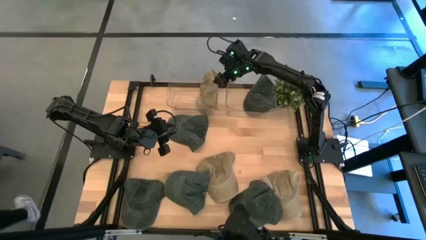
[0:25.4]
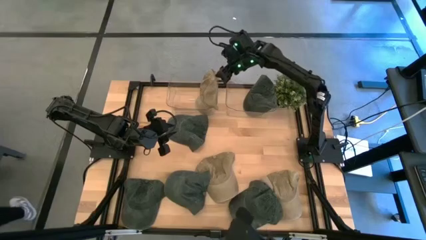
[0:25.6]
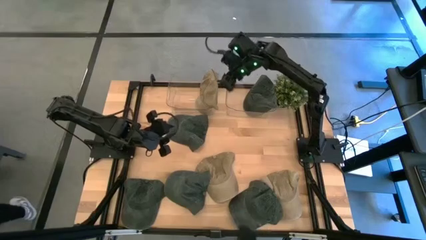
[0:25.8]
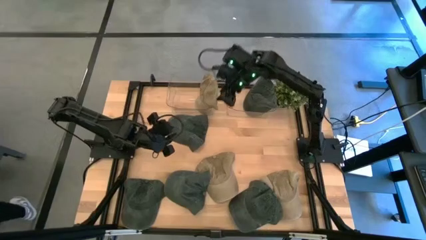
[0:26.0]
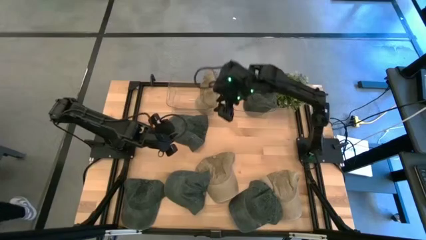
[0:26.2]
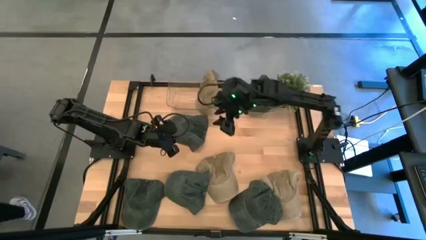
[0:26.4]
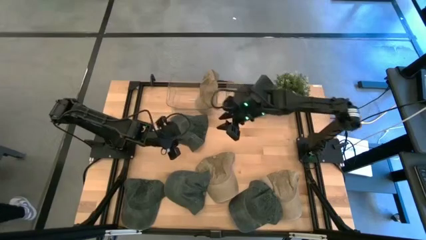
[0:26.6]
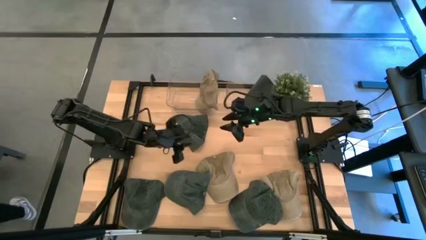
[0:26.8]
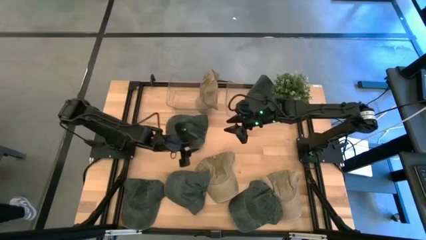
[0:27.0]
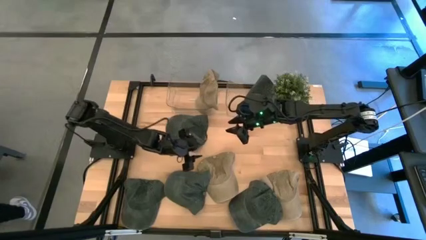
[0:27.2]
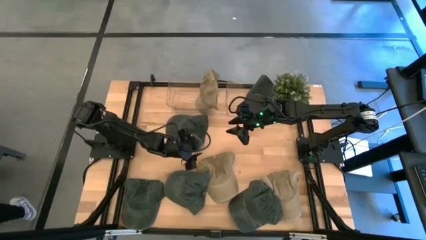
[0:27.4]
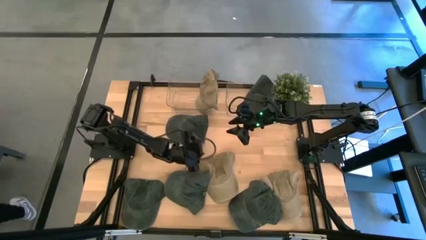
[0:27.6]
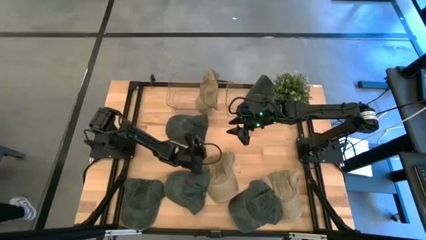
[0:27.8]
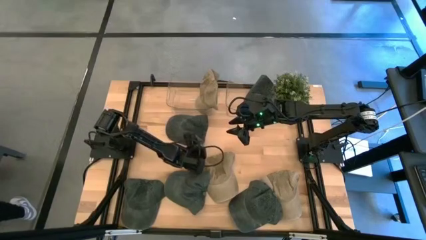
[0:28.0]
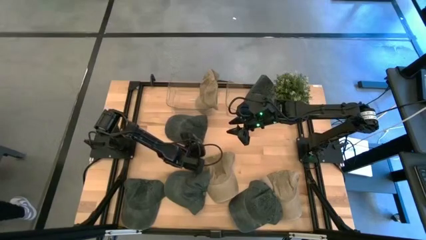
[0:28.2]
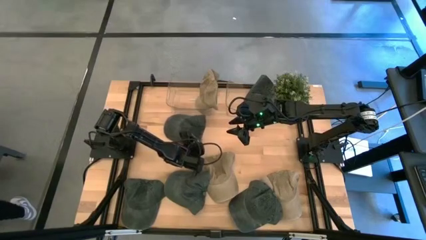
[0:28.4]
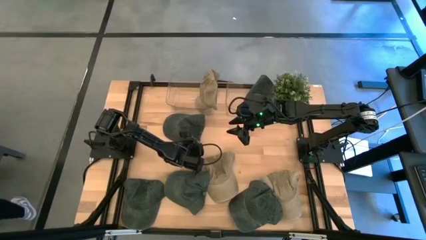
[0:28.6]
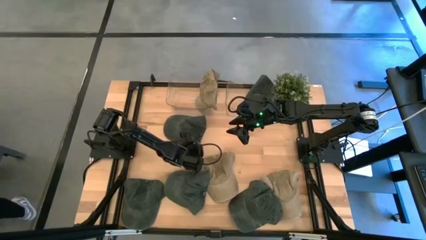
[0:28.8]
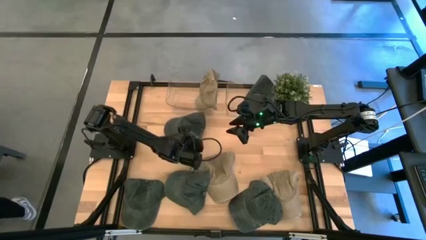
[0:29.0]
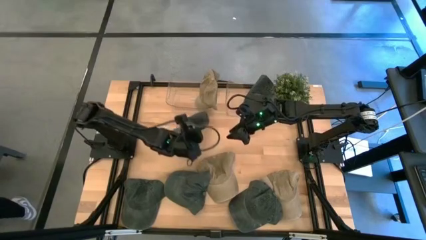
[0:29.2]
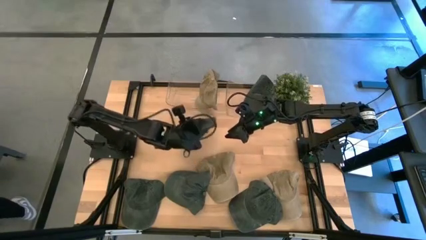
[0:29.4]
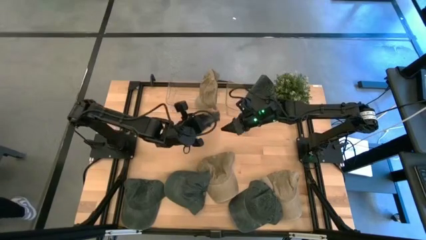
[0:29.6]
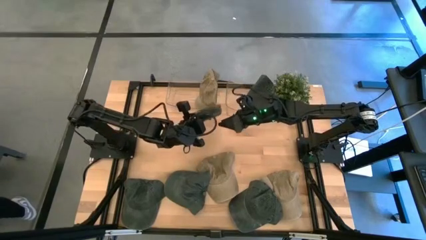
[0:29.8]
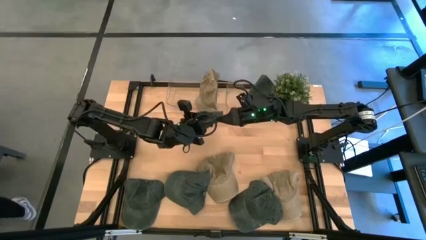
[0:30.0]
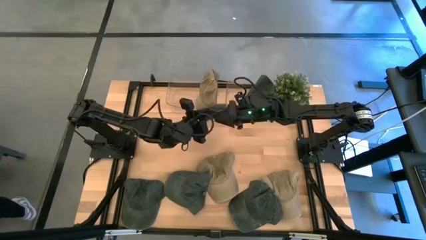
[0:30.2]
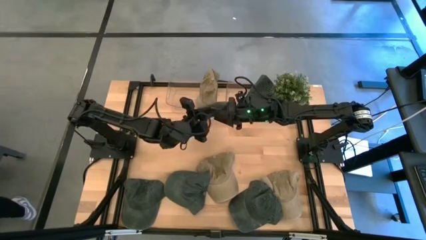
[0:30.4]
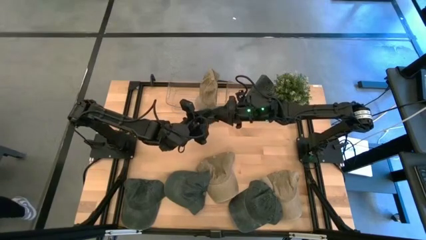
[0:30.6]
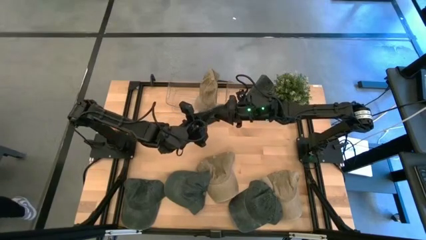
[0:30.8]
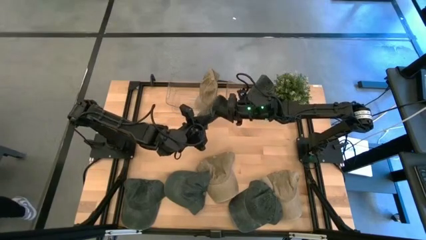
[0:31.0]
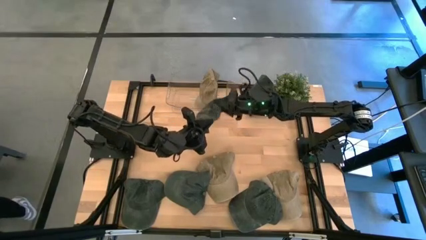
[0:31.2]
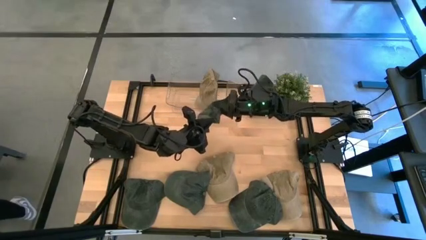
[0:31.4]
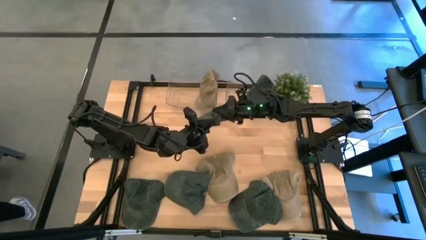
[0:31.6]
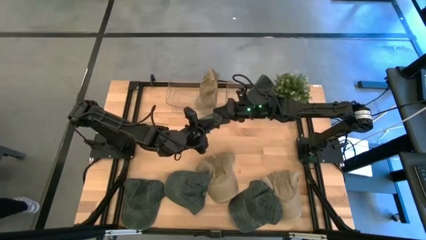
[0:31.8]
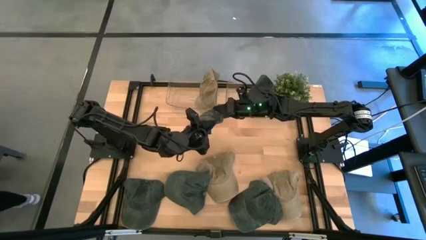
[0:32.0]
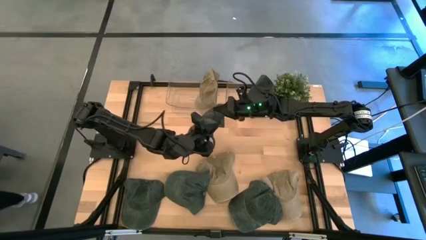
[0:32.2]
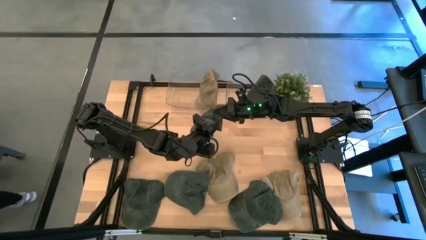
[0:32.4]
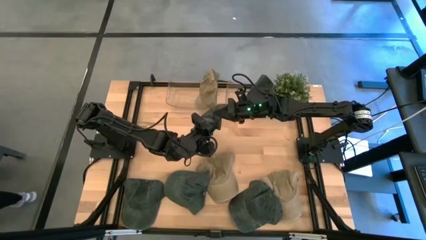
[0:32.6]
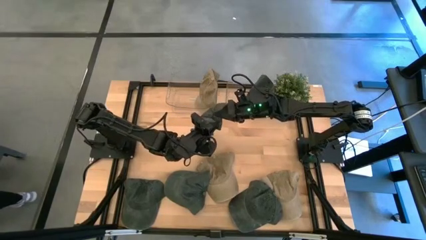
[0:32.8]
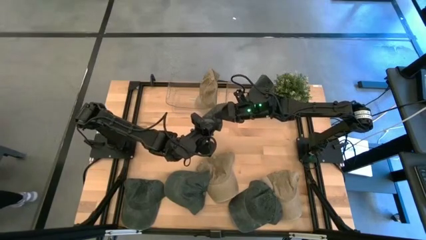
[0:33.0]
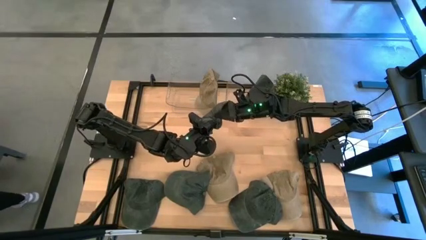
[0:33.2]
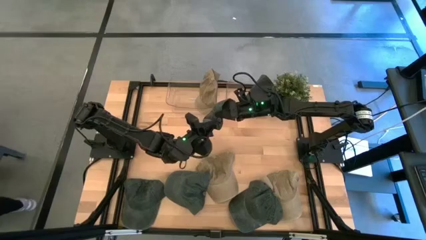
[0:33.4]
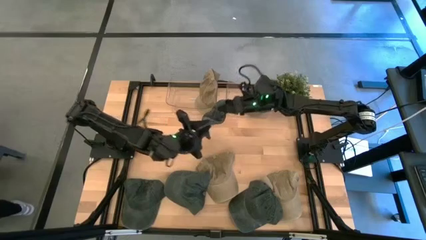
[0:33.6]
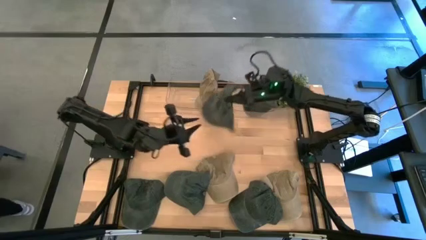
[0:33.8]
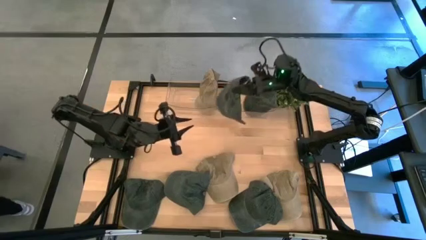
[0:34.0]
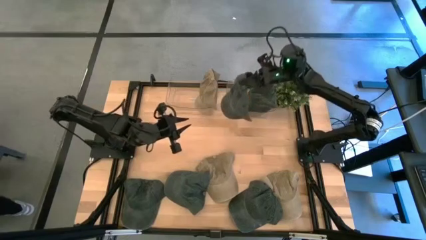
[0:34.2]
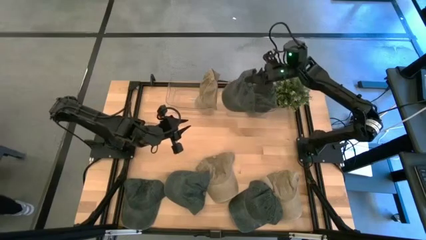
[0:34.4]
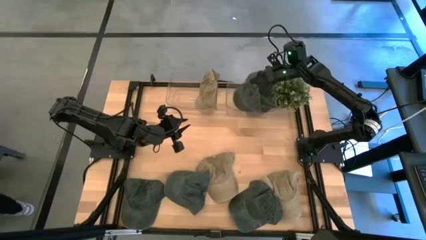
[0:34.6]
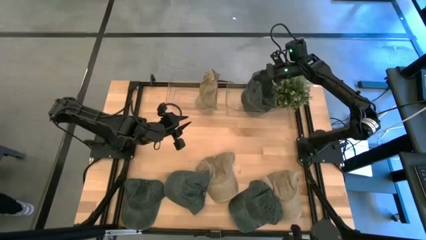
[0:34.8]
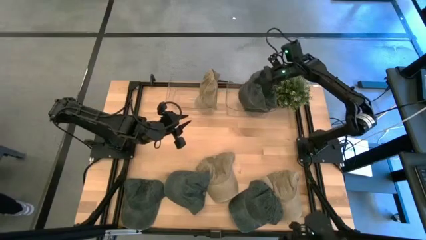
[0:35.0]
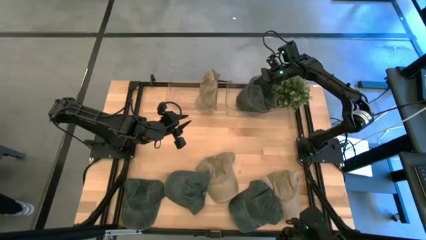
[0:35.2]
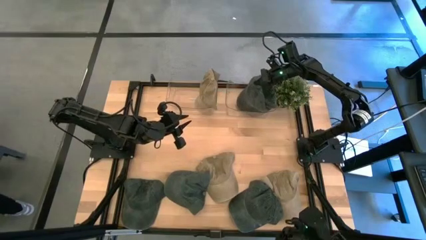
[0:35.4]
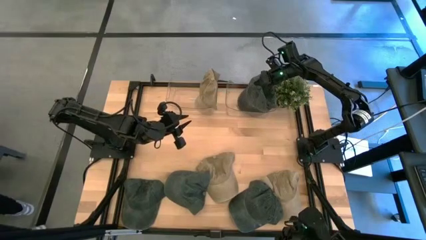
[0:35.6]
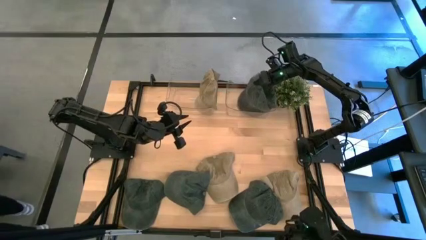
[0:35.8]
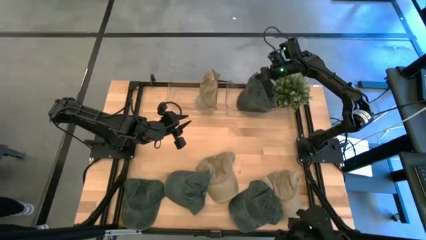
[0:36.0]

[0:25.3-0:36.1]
Task: Pick & Place hat
Put the black cap into the right transparent bin
